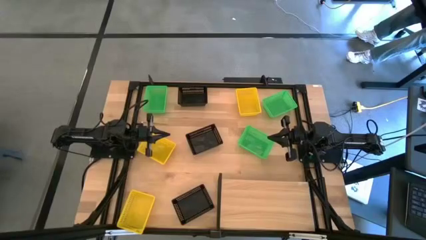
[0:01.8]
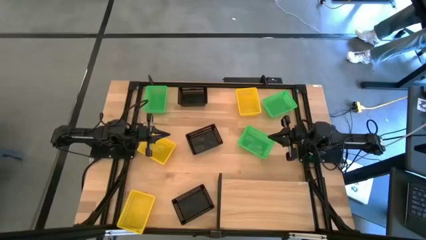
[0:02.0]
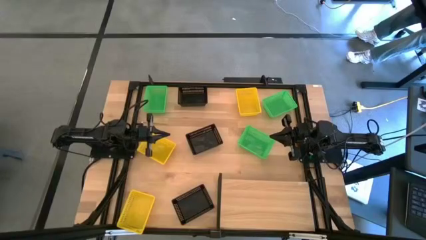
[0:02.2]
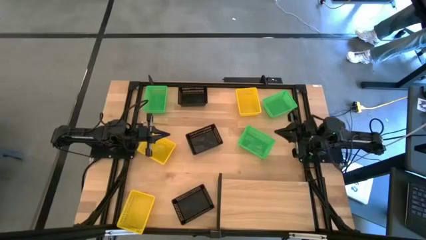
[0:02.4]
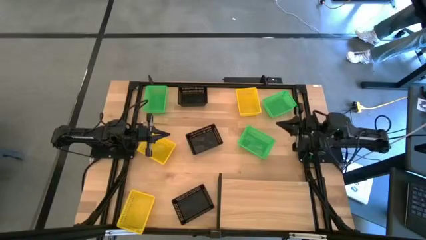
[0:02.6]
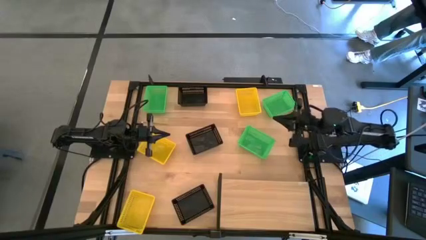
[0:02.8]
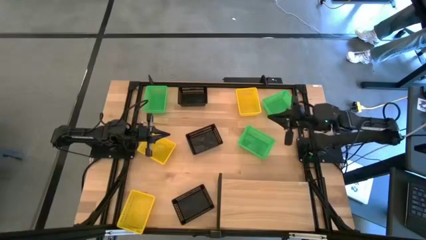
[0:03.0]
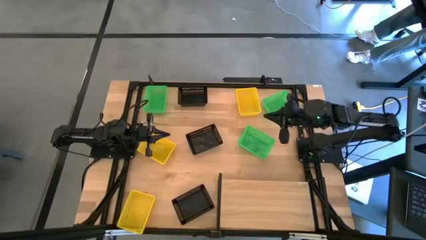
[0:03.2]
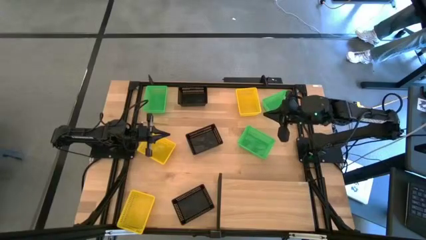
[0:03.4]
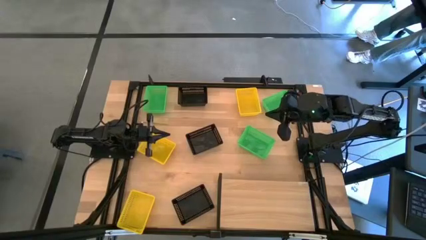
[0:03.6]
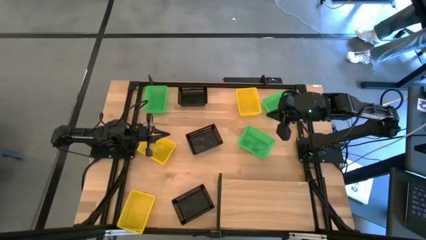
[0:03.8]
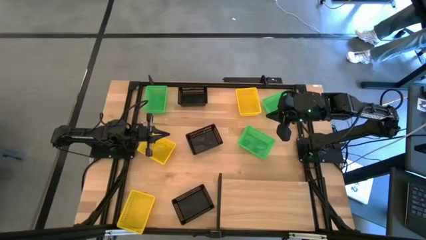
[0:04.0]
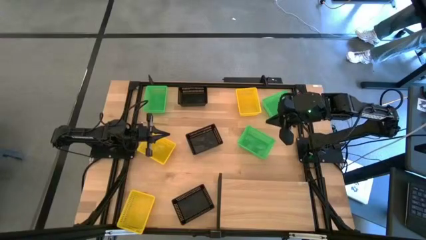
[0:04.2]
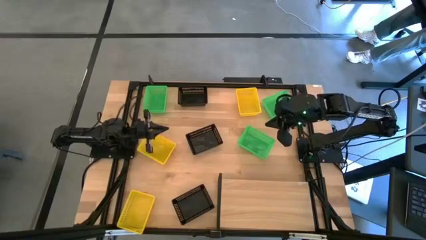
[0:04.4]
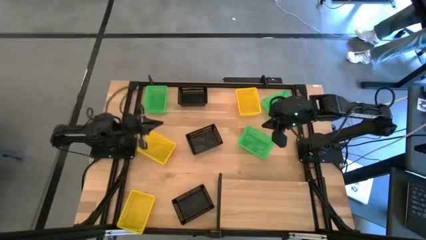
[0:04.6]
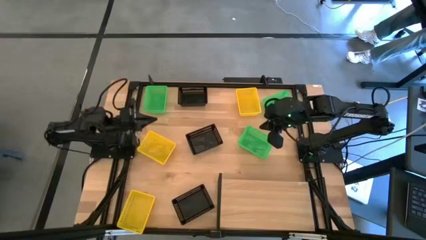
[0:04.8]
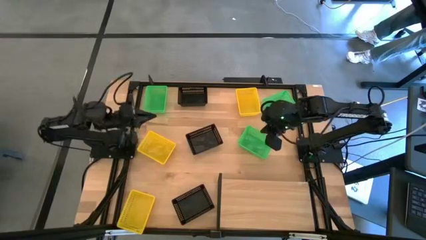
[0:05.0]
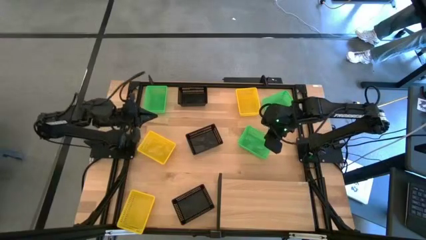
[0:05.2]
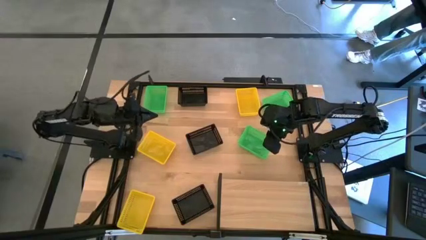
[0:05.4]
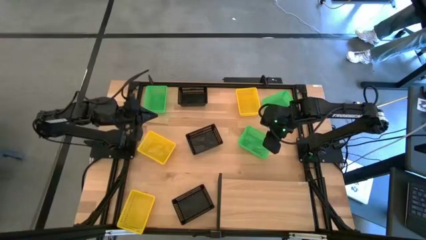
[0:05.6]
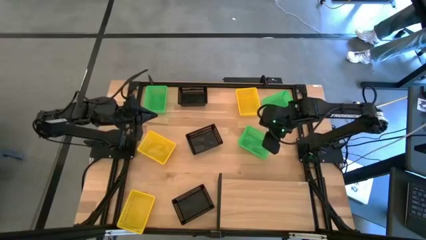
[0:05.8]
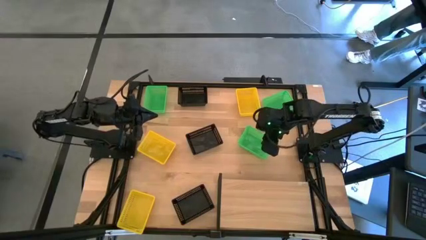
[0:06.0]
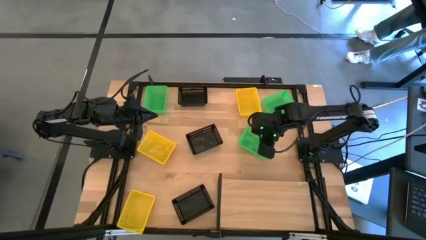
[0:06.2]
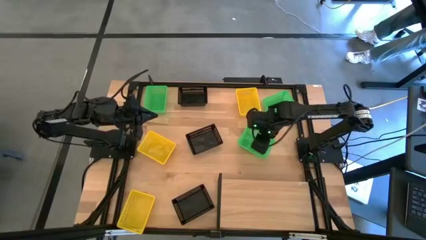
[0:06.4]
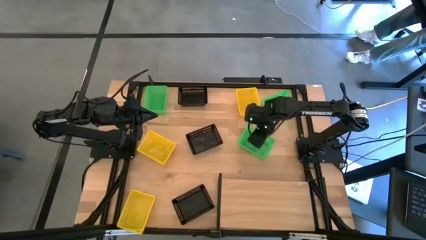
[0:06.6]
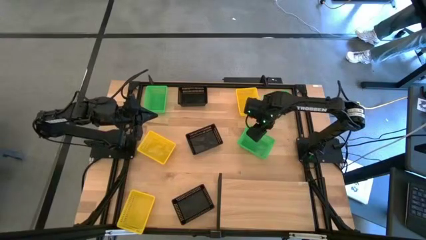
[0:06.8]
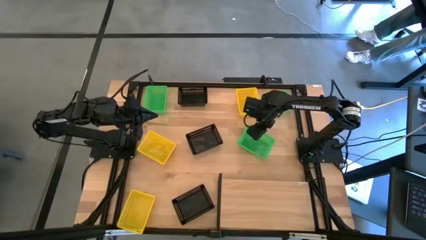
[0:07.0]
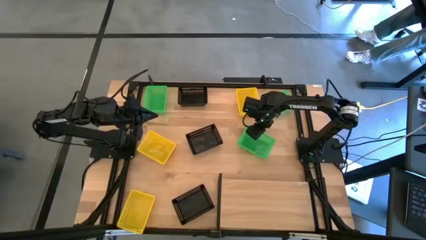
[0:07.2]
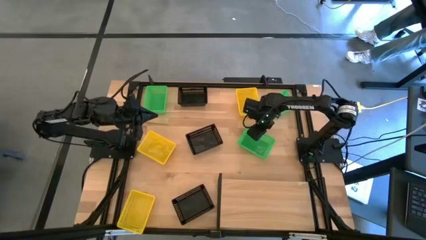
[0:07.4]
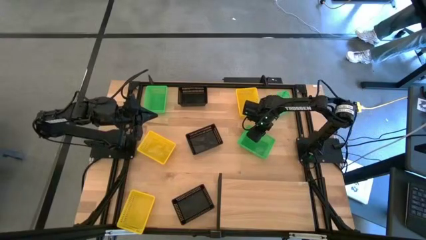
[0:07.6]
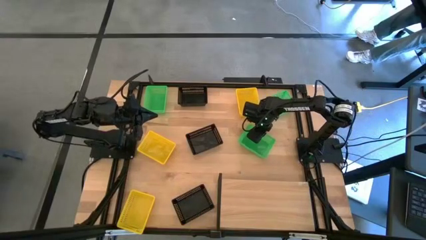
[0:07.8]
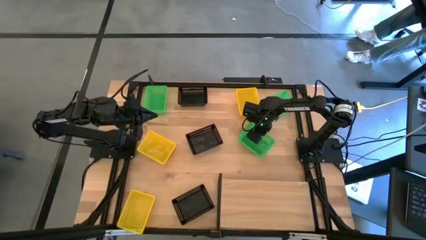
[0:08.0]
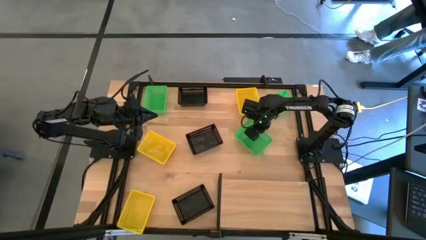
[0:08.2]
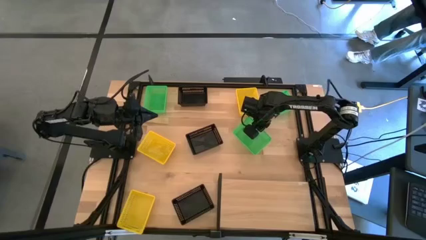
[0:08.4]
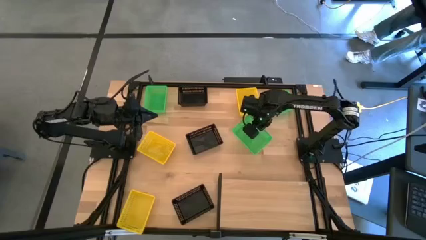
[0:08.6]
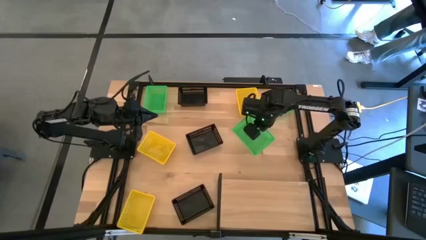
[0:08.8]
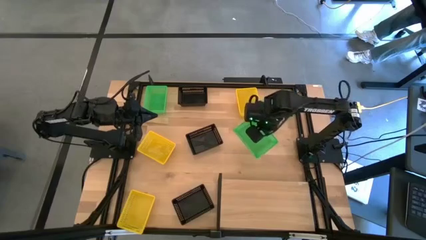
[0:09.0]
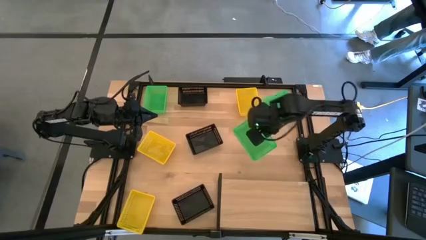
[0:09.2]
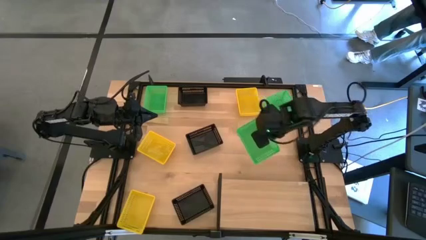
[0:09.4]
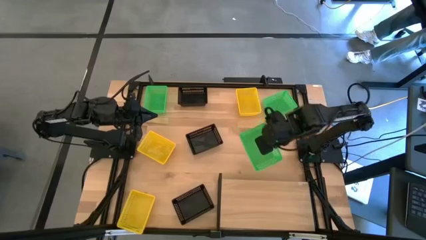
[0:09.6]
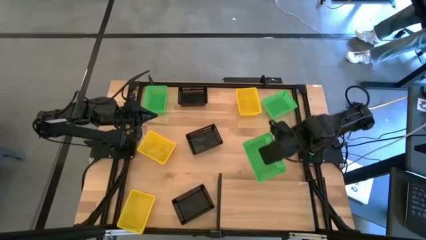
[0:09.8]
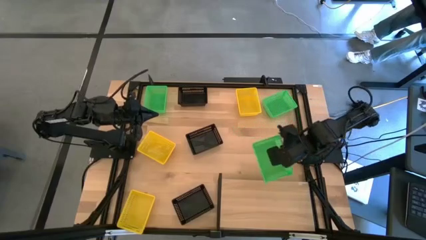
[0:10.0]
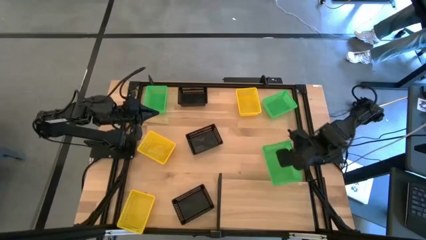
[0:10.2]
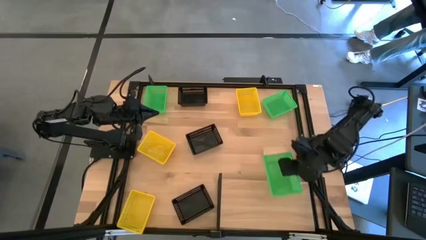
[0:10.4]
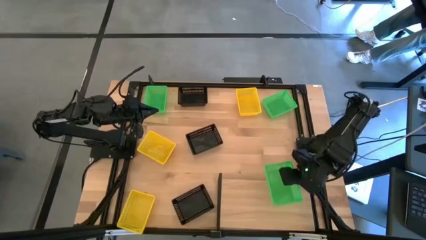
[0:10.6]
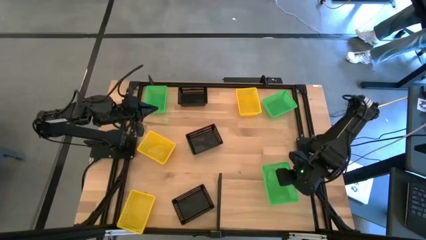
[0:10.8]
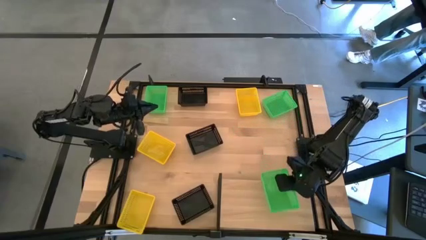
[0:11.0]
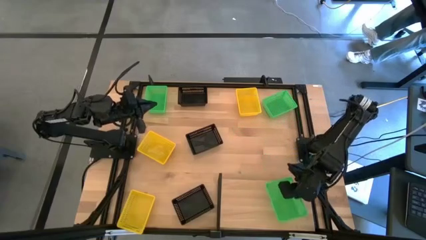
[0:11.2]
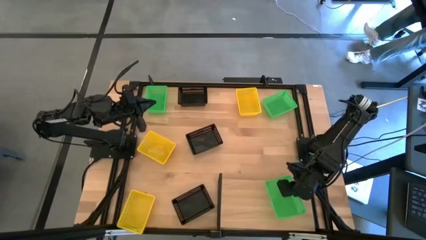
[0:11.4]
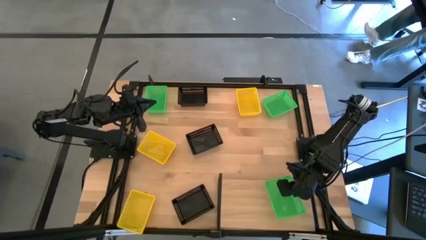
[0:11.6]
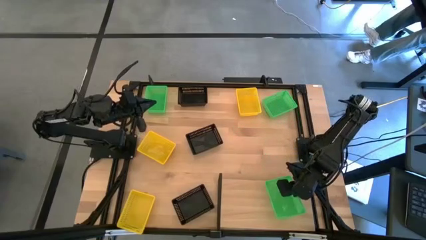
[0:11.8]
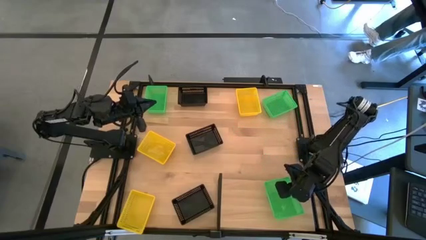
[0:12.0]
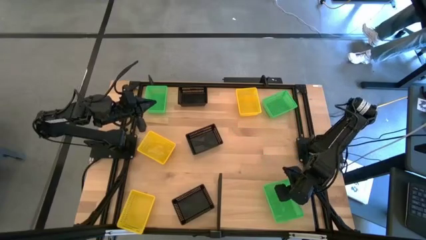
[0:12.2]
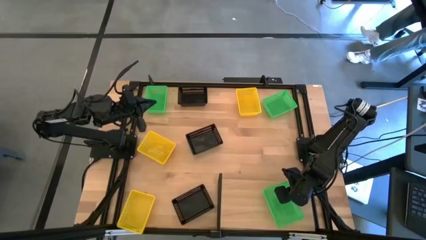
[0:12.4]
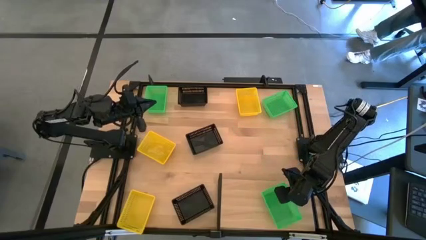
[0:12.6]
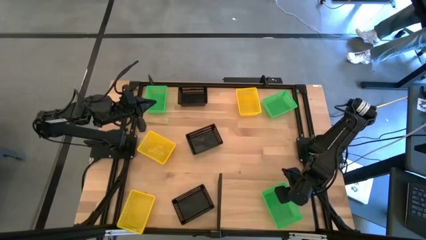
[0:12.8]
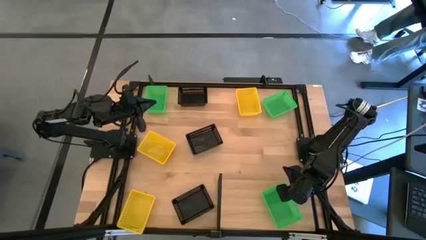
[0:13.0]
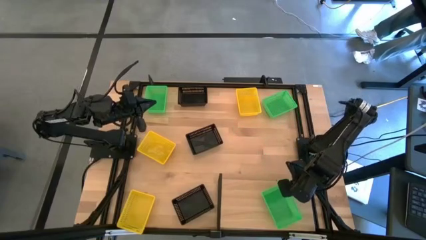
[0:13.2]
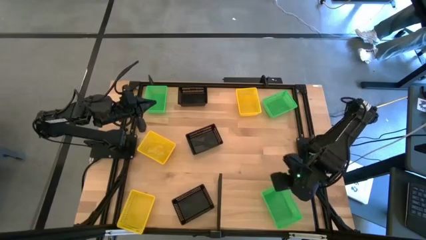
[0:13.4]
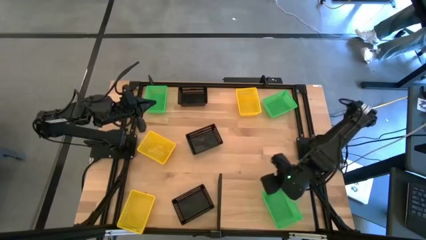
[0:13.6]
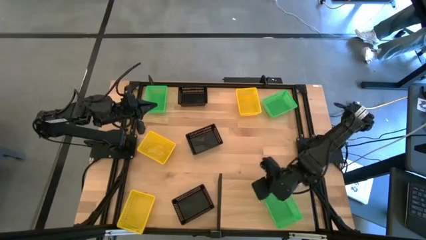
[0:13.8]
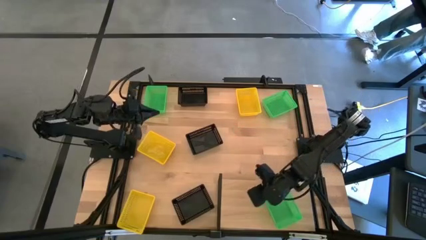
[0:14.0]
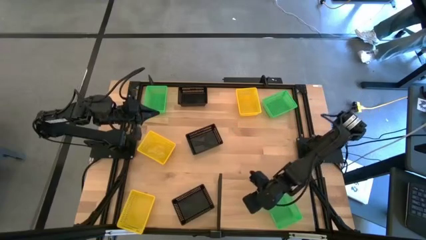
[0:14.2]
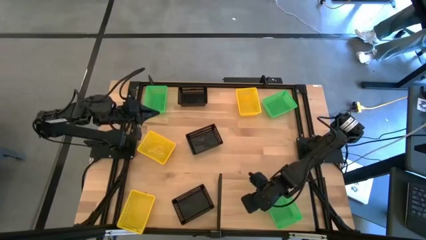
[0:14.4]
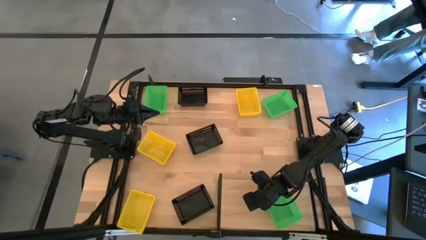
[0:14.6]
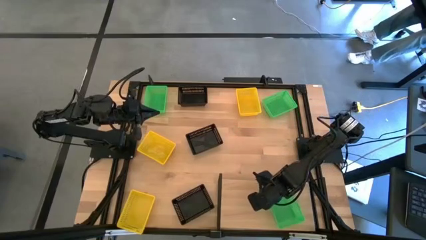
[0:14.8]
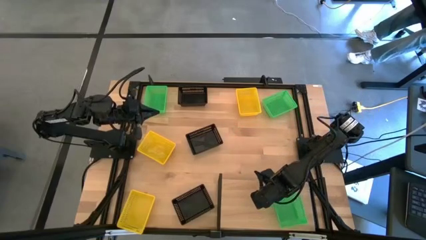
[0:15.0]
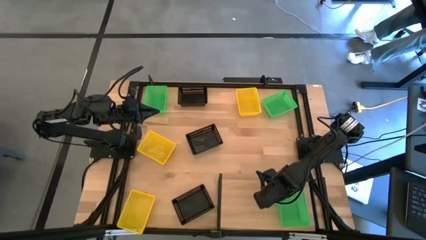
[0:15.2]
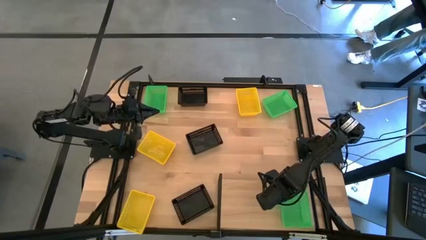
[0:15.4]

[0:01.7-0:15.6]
Task: Stack baskets on shelf by color
Put the bottom green bin on the shelf
